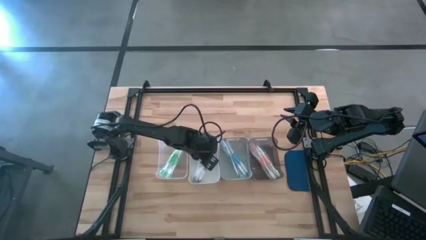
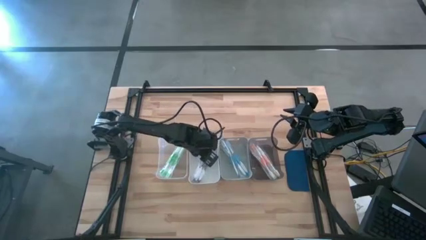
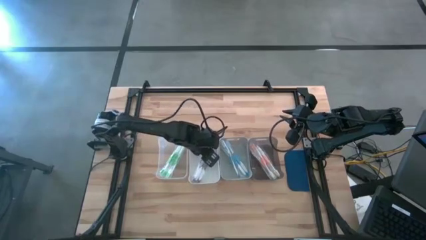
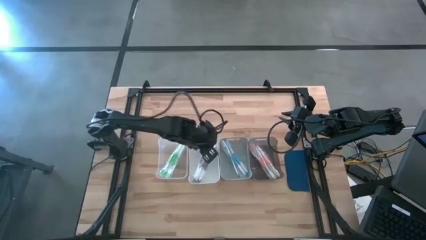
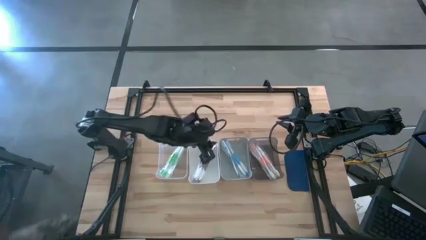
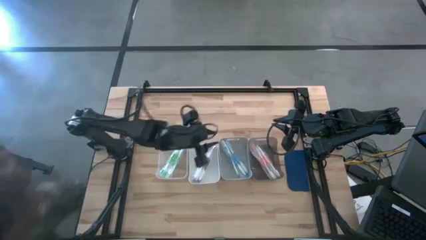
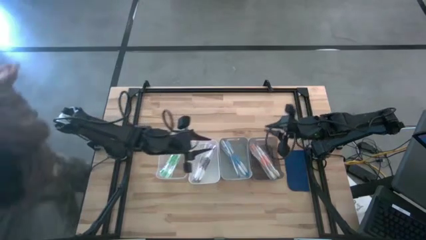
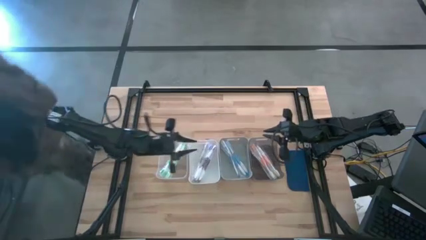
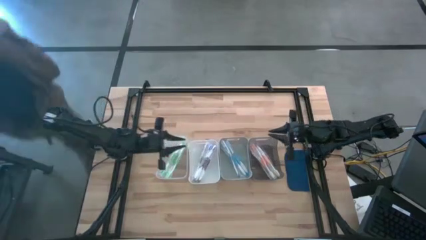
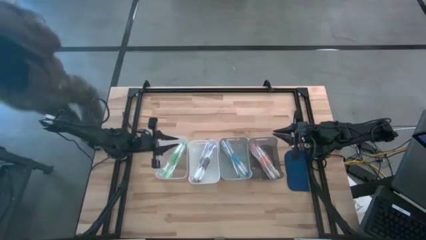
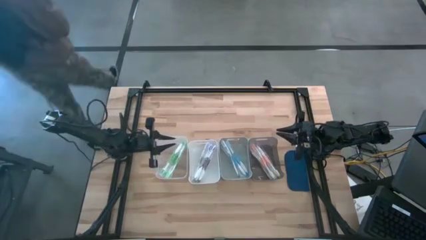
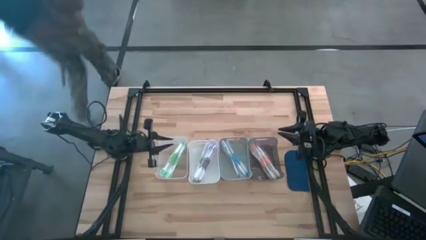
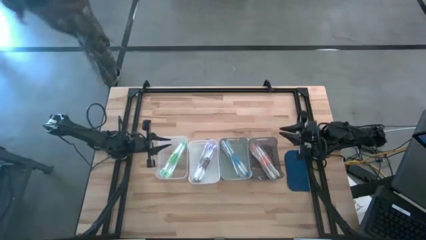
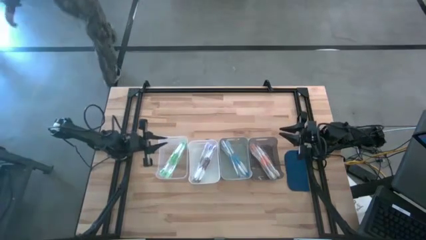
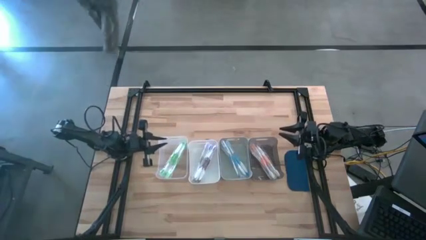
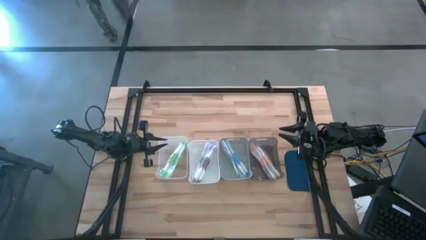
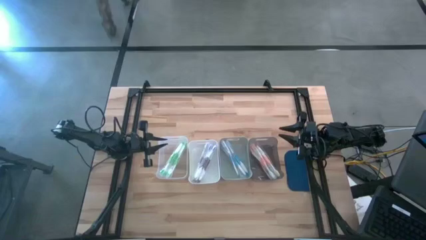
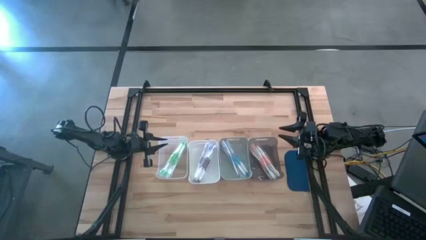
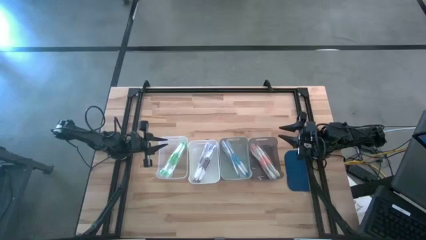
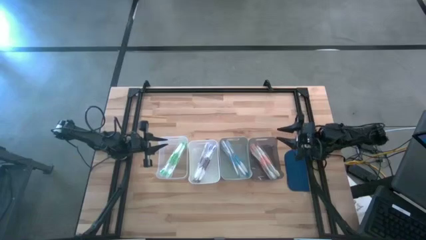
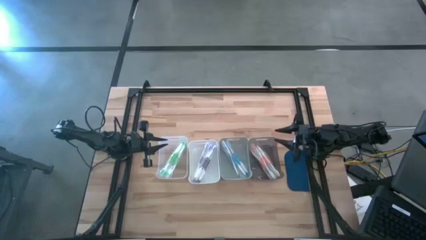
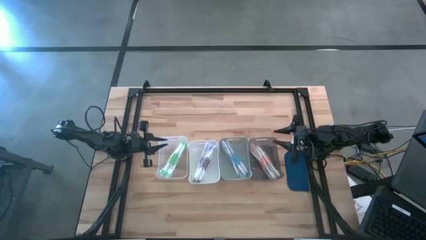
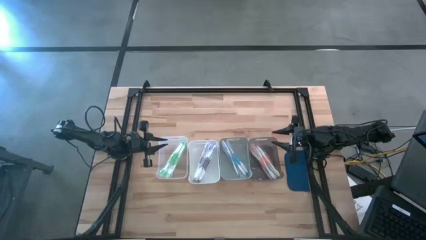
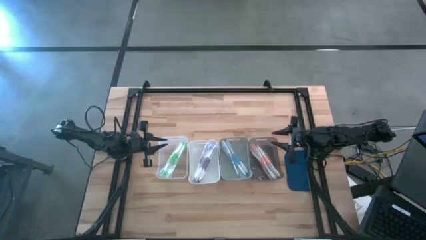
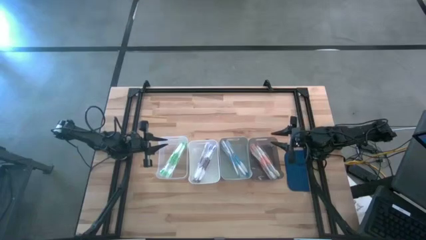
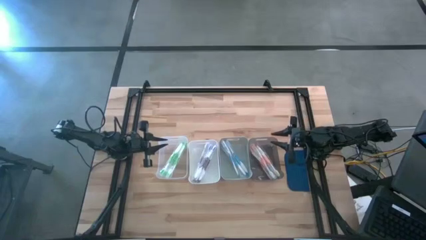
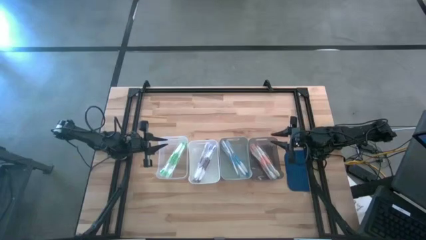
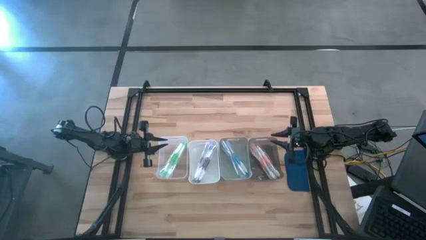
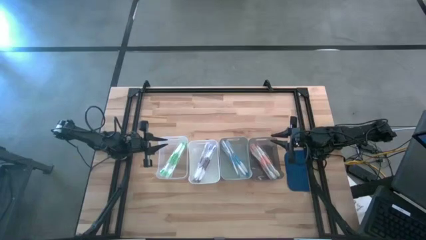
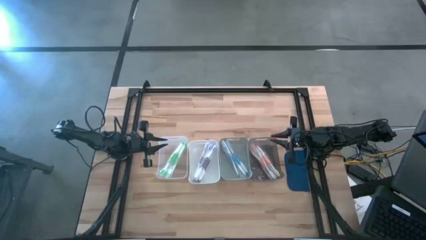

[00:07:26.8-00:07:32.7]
Task: Pick & Place Toothbrushes
Return to Home Position

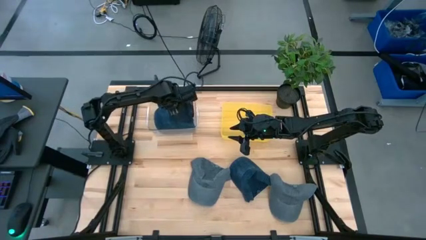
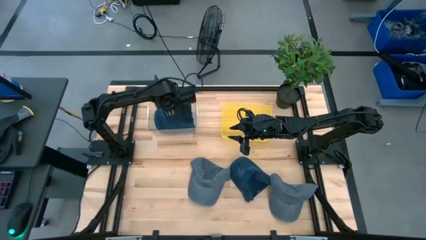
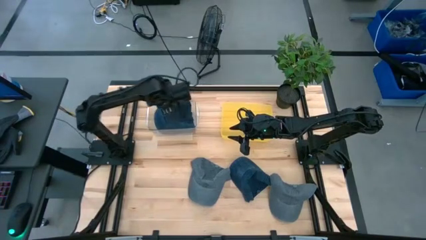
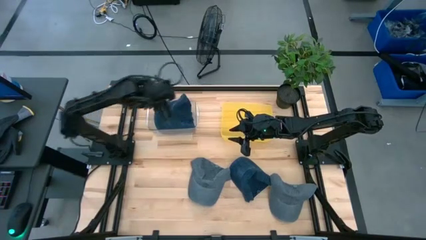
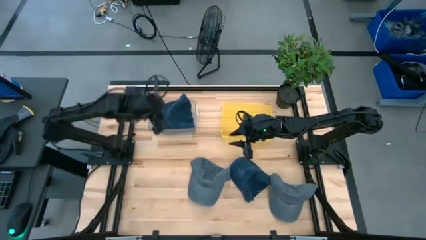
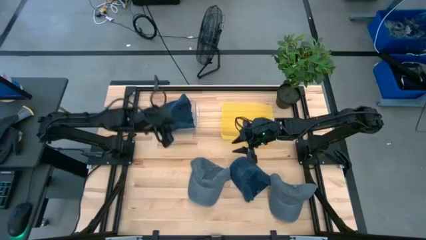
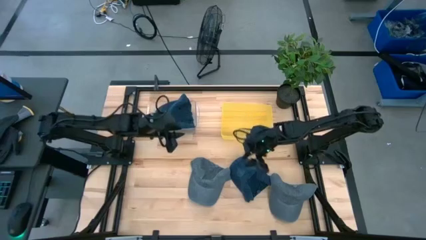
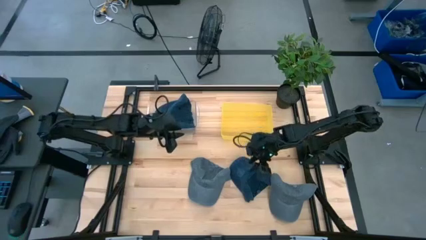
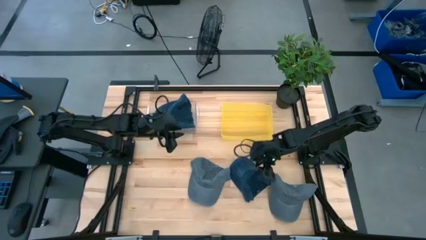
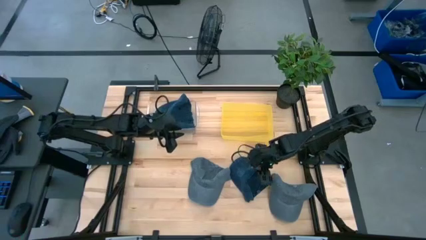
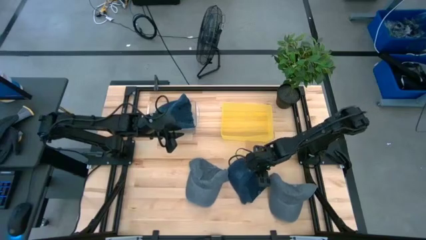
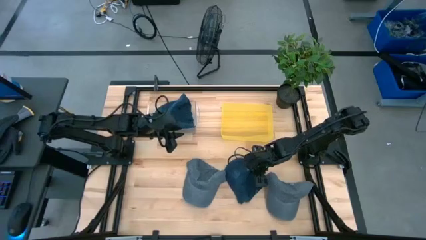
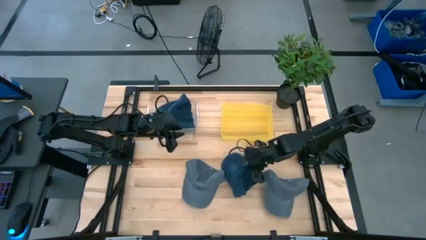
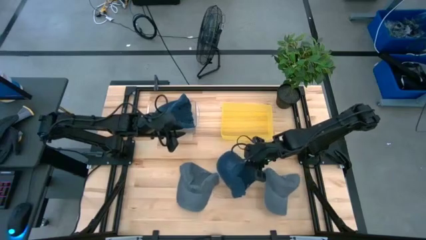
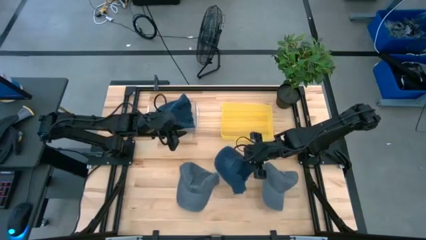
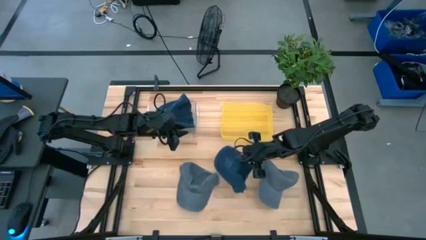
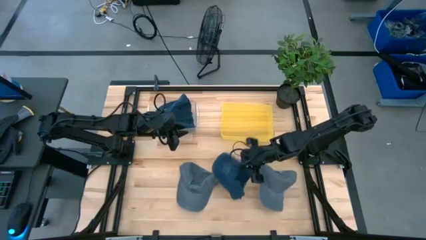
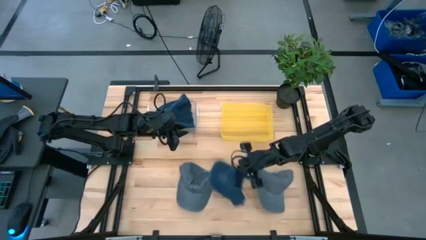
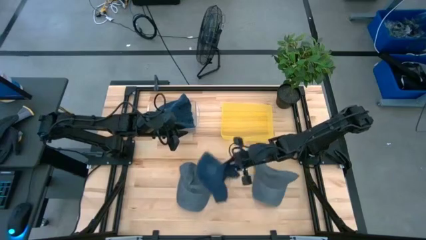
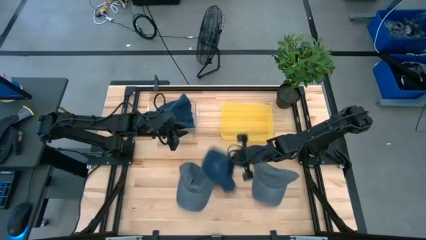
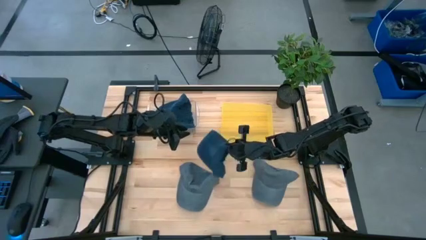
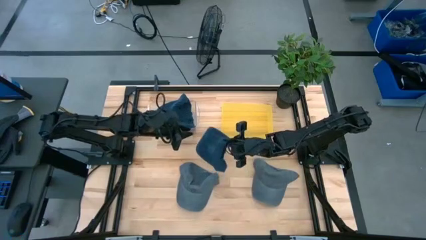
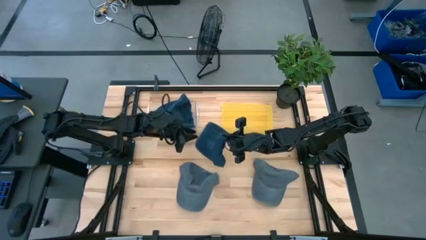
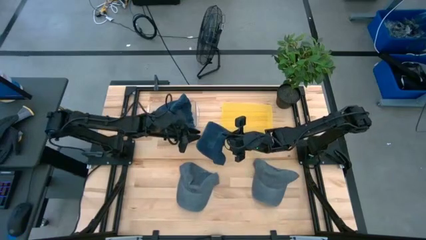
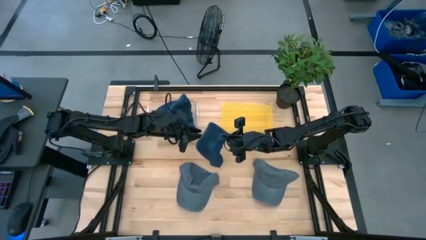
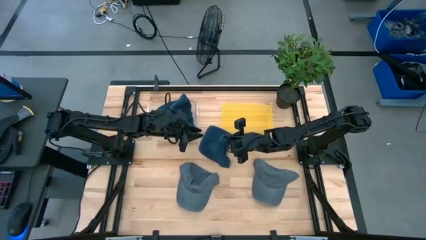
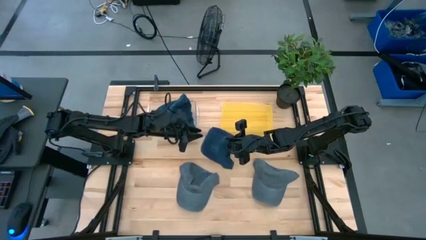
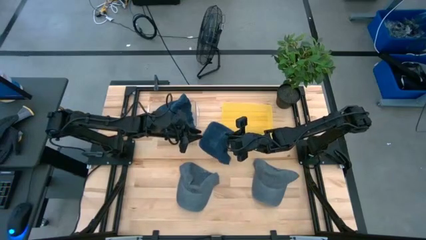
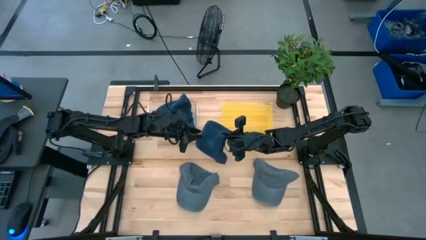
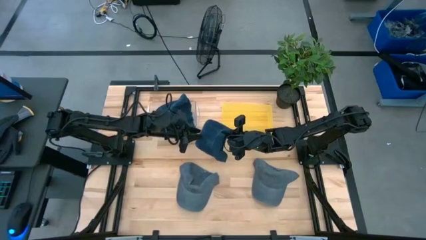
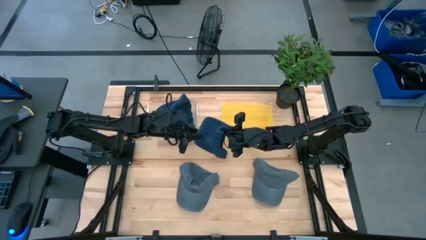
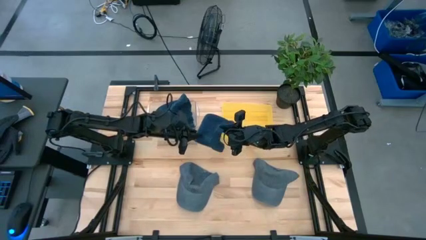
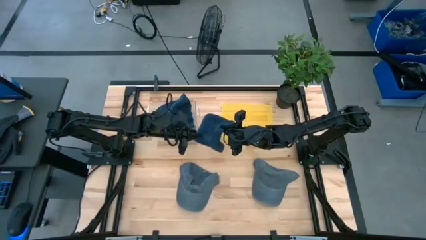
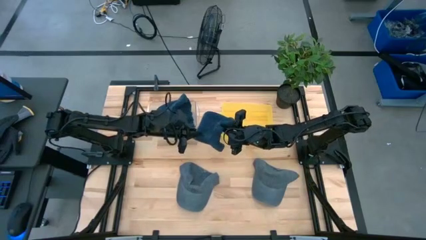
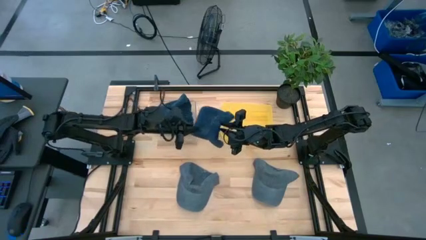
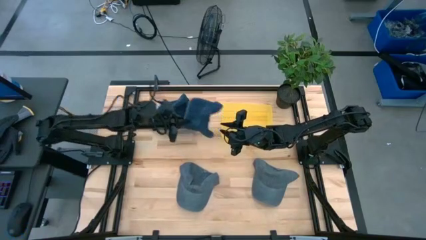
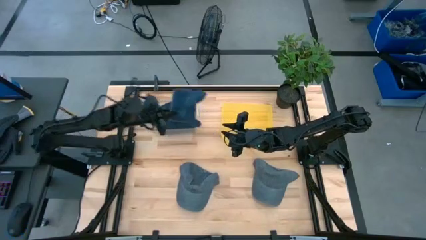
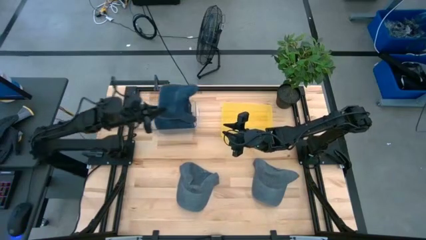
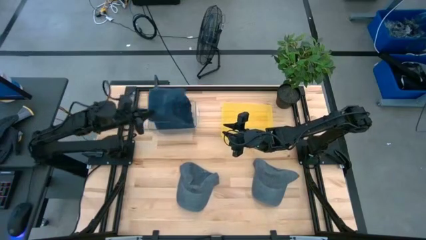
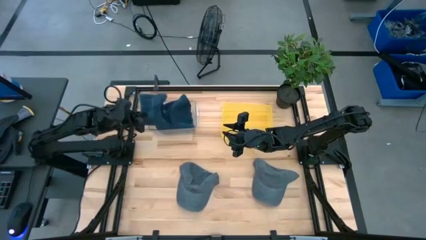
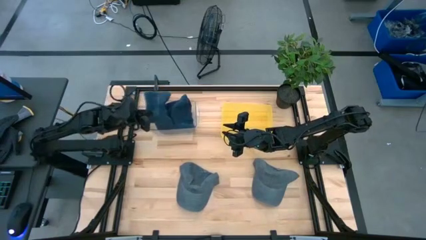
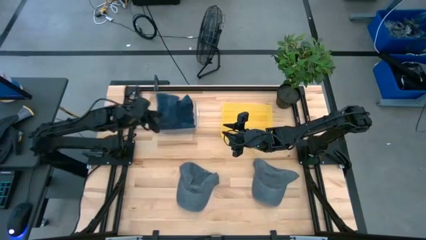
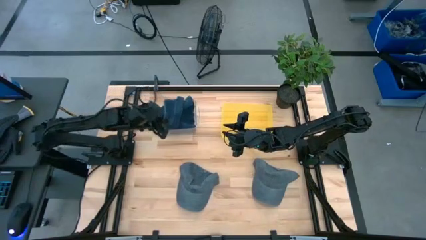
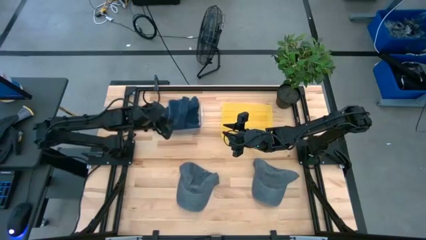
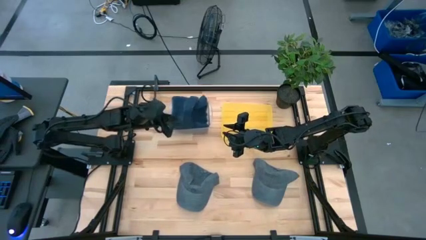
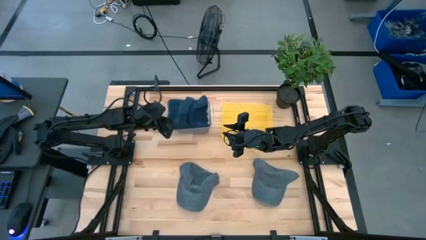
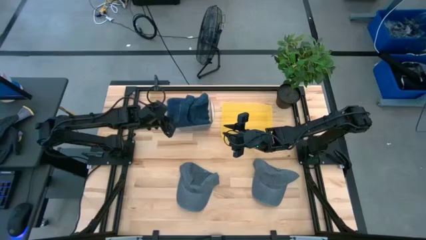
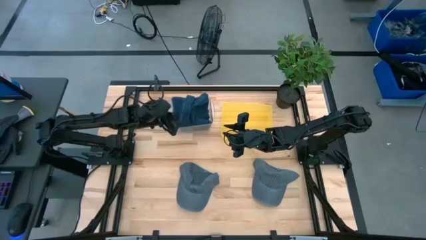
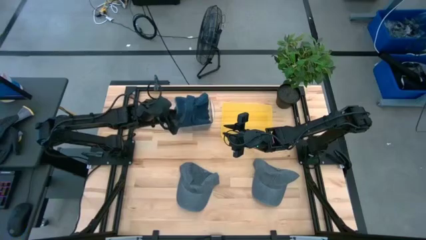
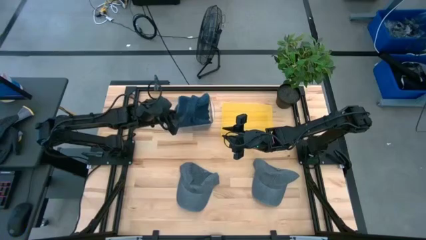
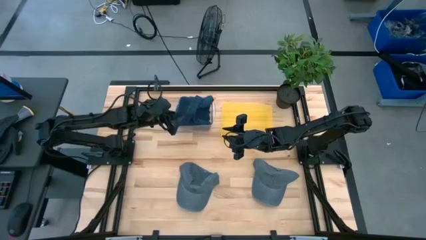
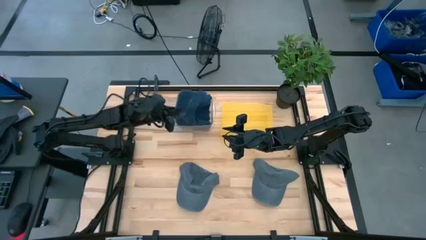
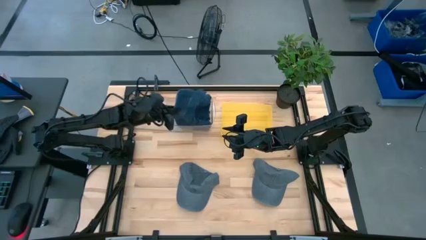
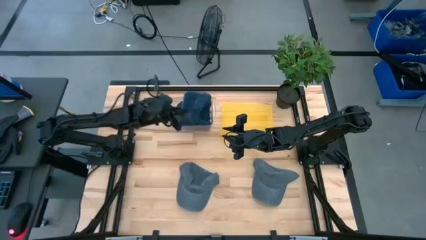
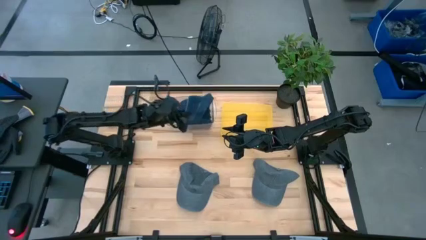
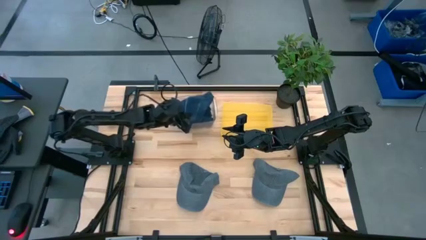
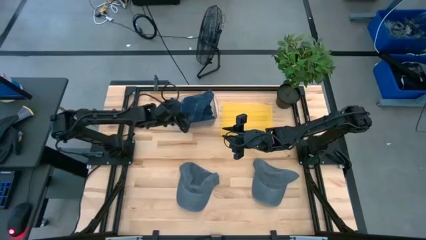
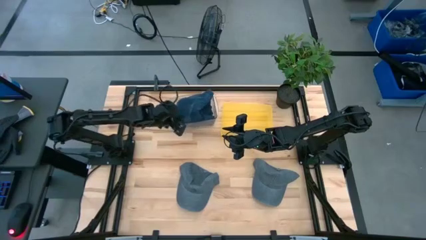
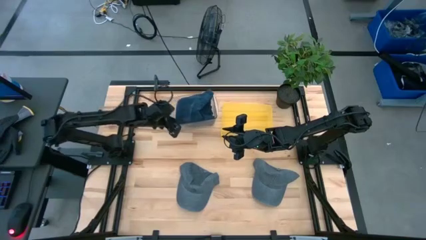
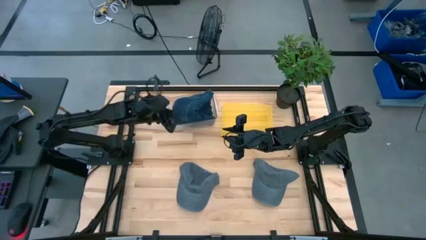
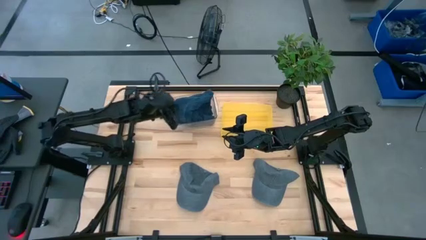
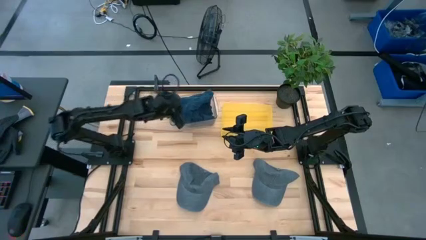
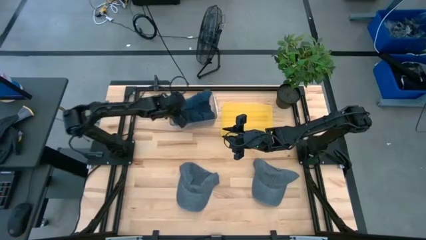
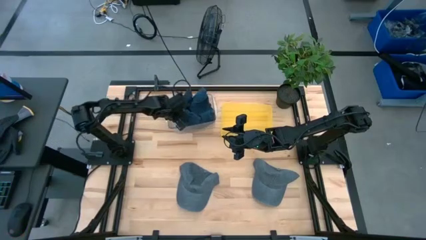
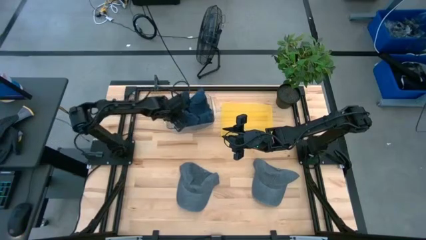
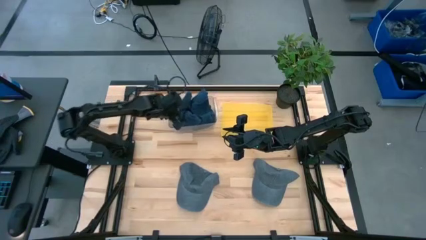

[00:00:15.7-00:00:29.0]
Task: Pick & Place hat
Put the blue cap into the transparent bin
